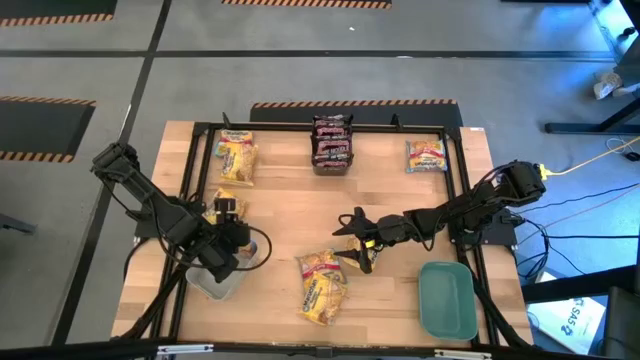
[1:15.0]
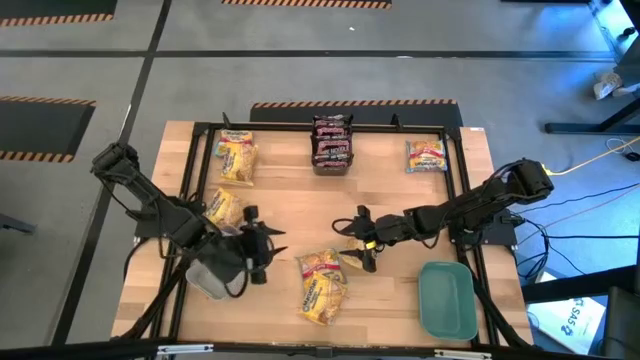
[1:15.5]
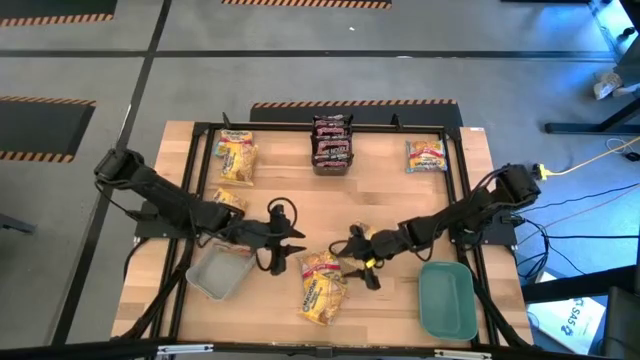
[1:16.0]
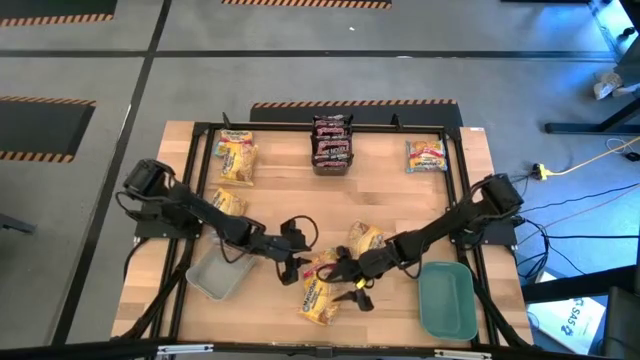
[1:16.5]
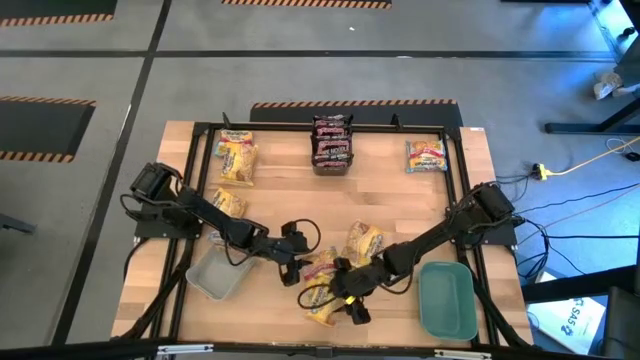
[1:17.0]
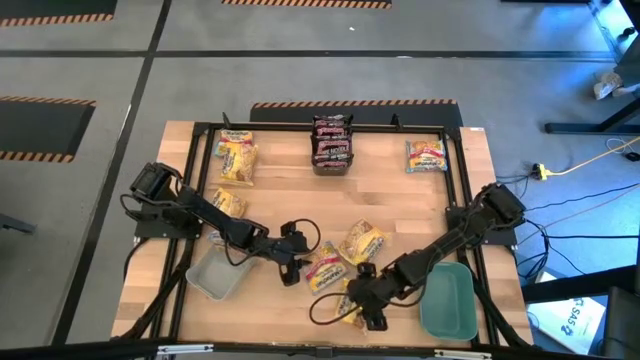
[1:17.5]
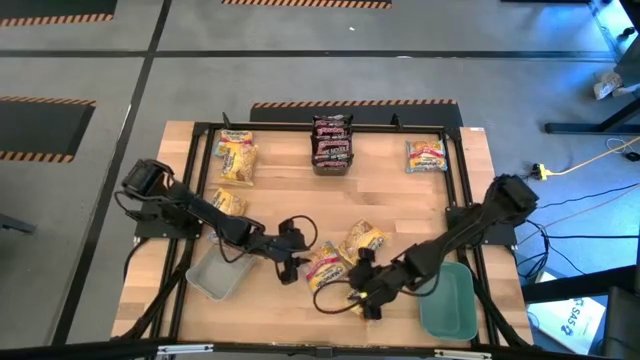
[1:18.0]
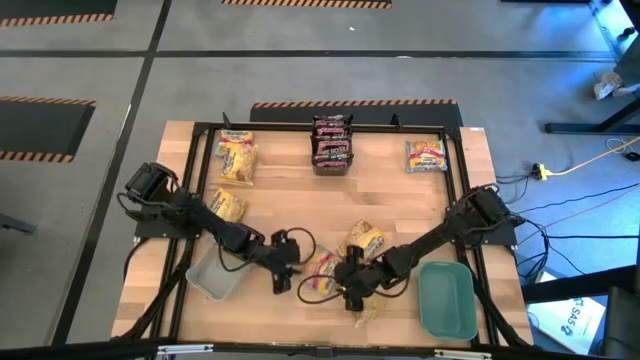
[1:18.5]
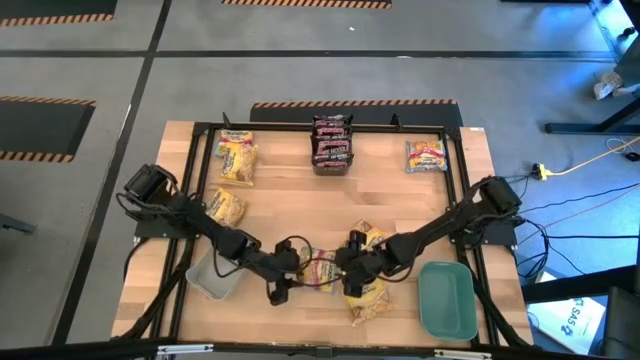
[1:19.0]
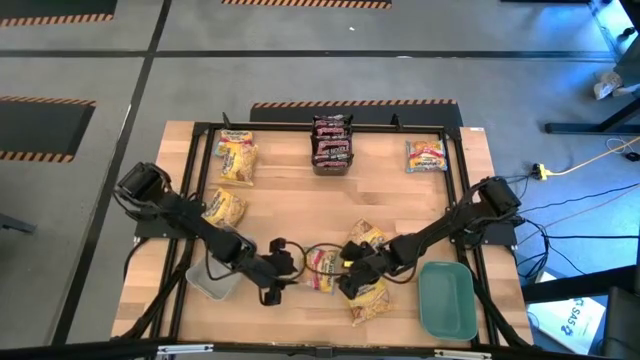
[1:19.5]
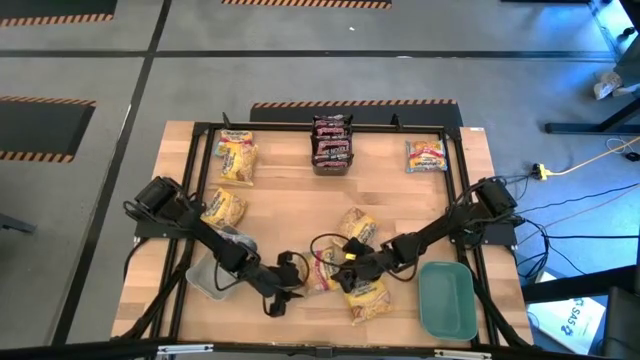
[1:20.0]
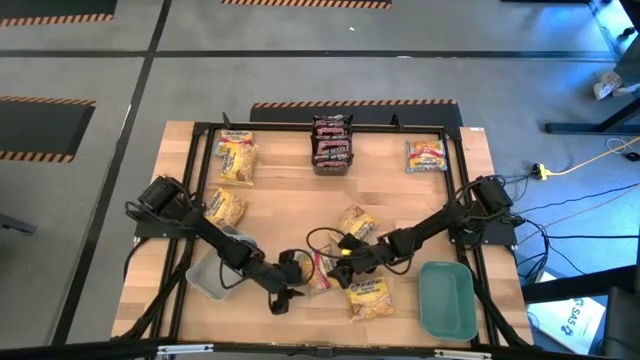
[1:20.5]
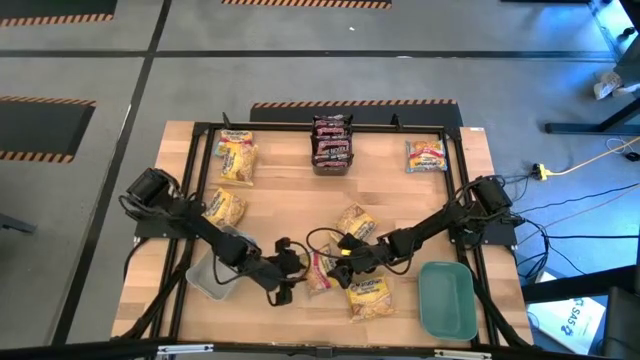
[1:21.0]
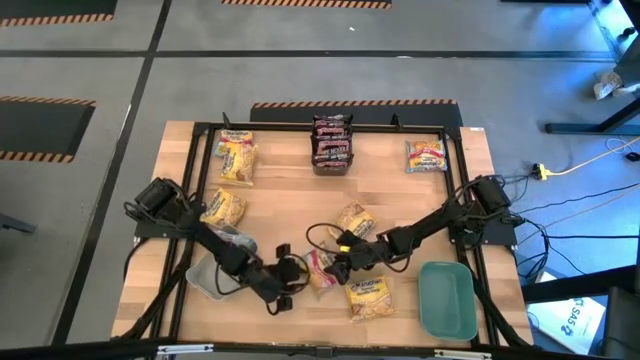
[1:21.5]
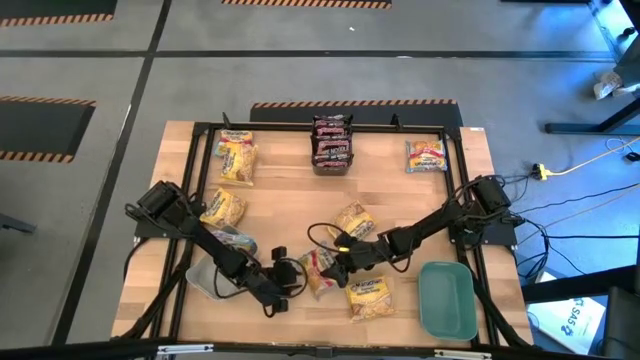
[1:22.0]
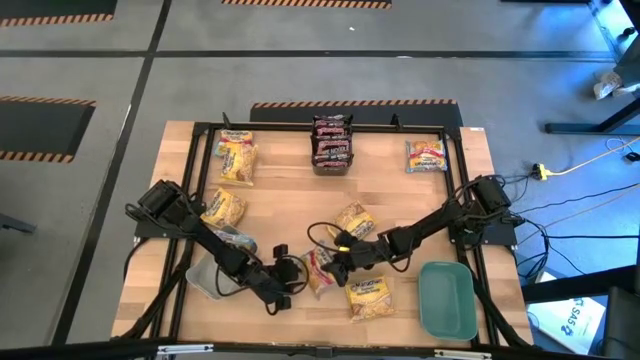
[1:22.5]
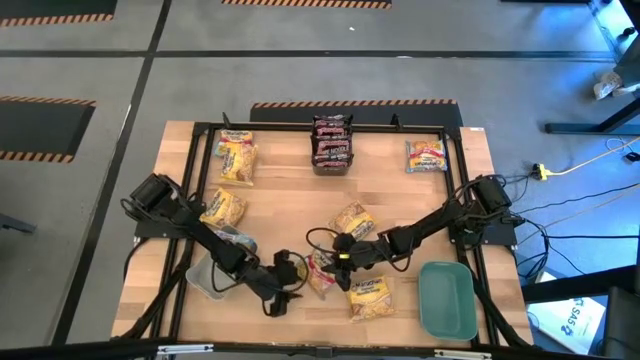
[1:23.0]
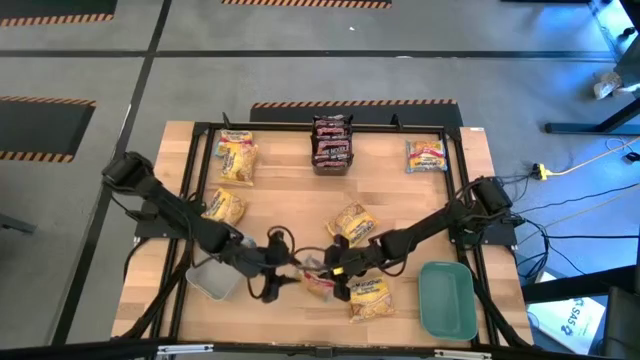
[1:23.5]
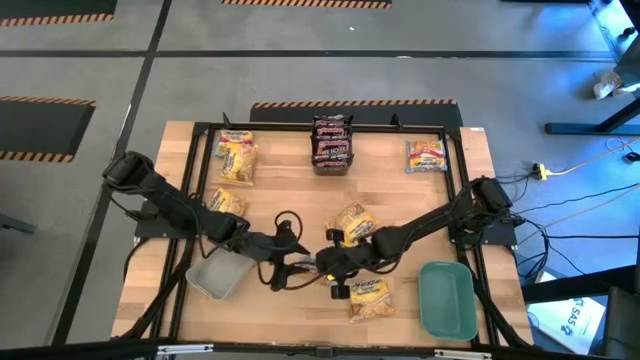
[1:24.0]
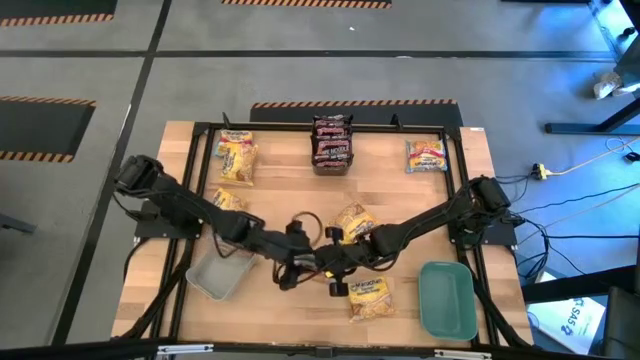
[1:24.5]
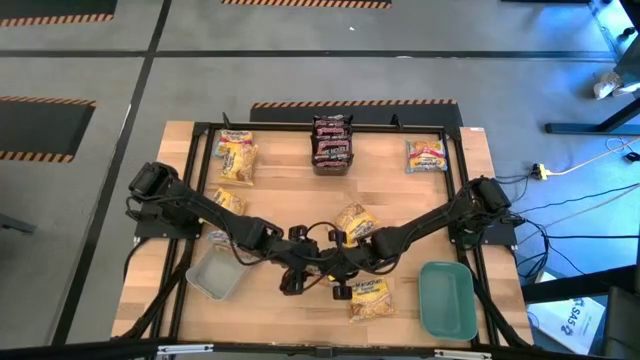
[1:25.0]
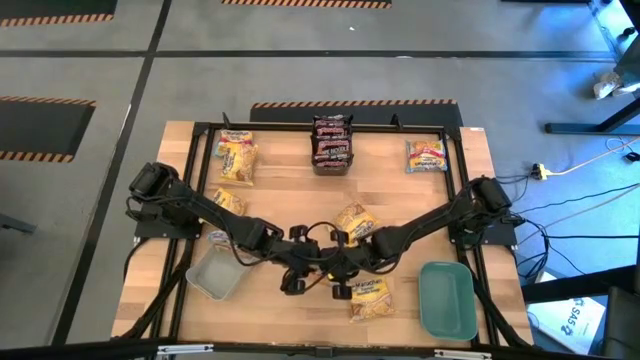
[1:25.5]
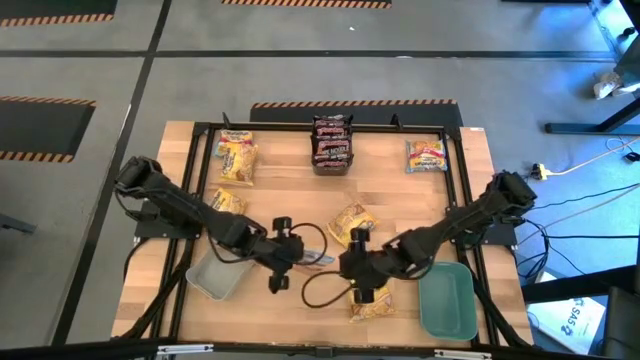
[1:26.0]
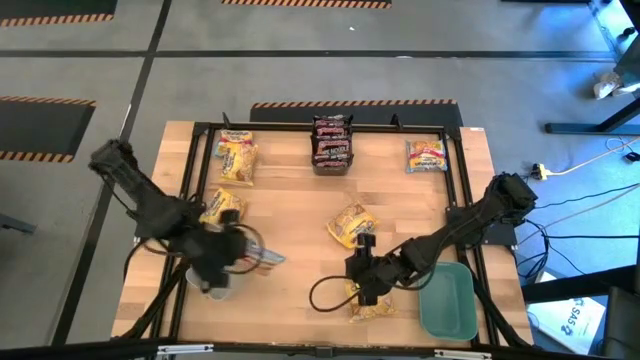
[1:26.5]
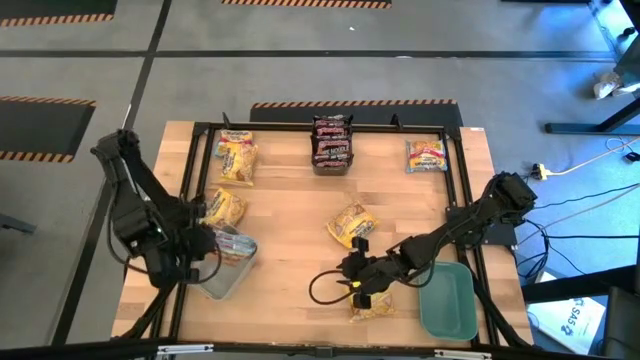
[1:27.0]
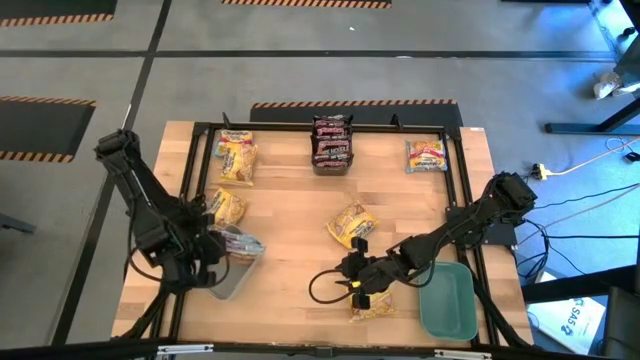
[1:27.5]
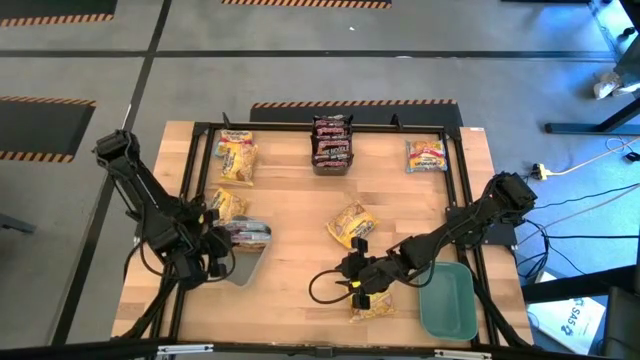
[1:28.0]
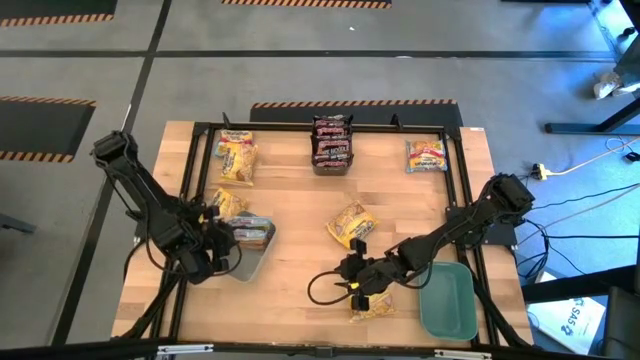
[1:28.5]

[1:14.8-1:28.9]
Task: Sort Maruchan noodles
Put the bottom blue noodle pack into the gray bin

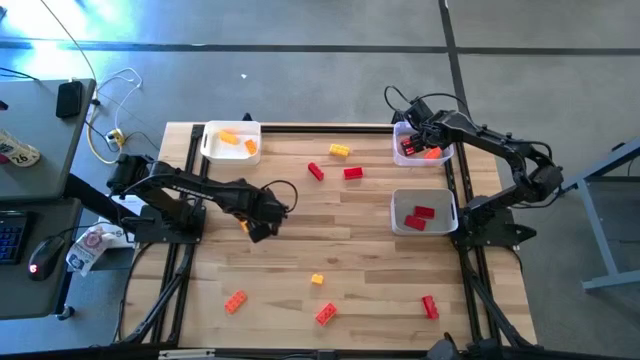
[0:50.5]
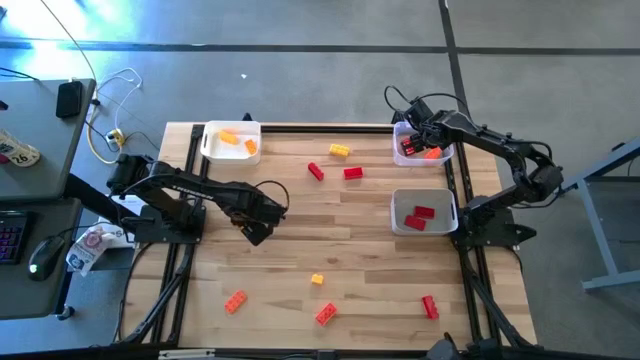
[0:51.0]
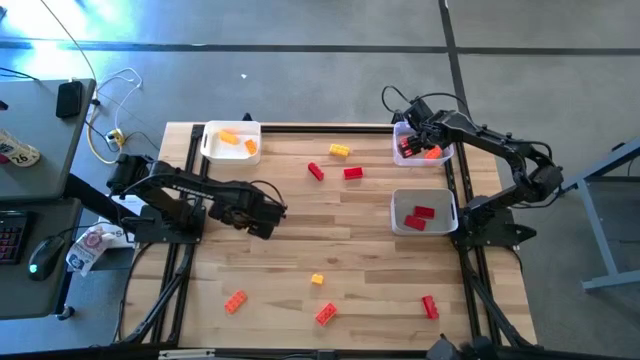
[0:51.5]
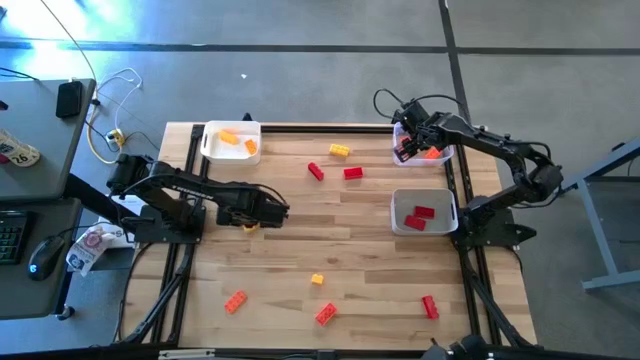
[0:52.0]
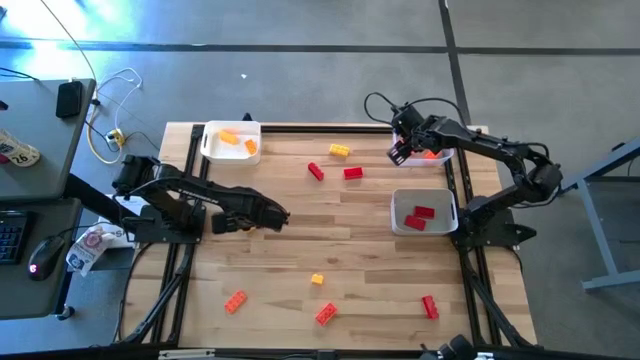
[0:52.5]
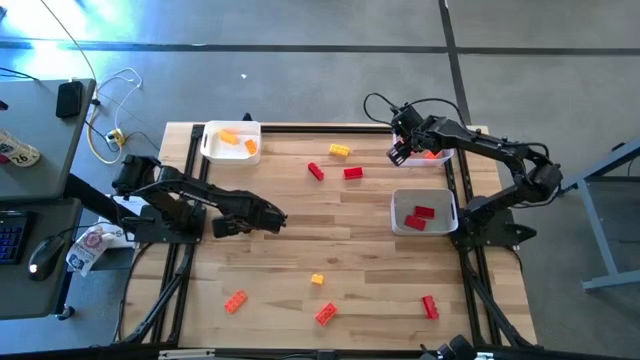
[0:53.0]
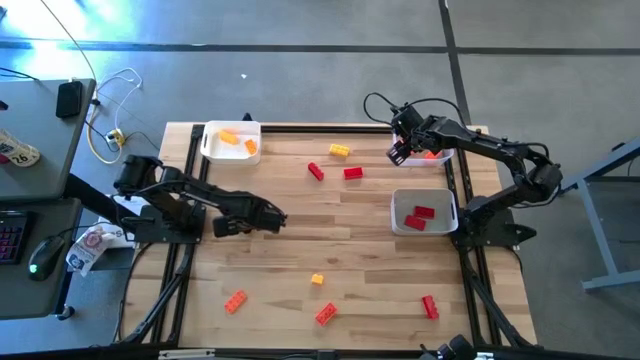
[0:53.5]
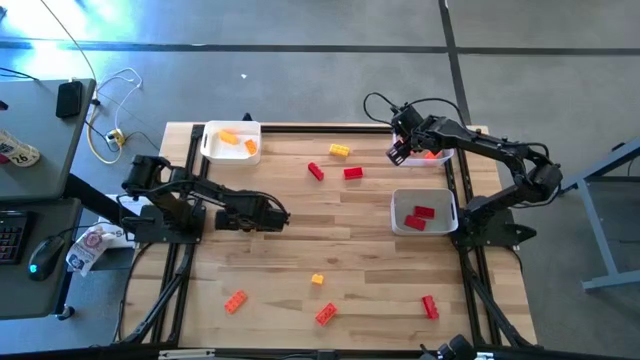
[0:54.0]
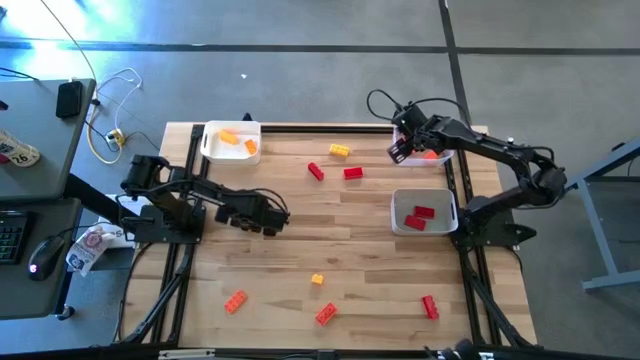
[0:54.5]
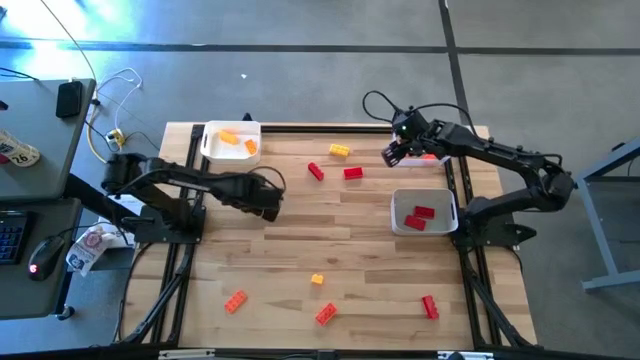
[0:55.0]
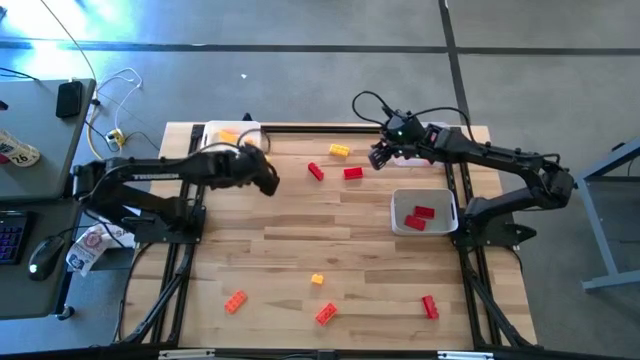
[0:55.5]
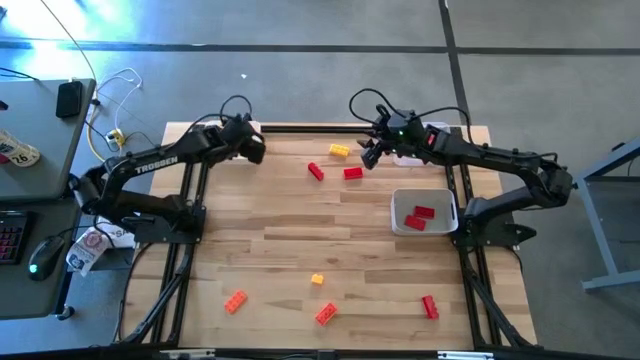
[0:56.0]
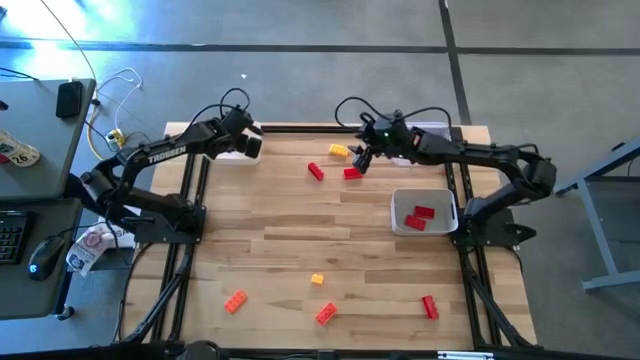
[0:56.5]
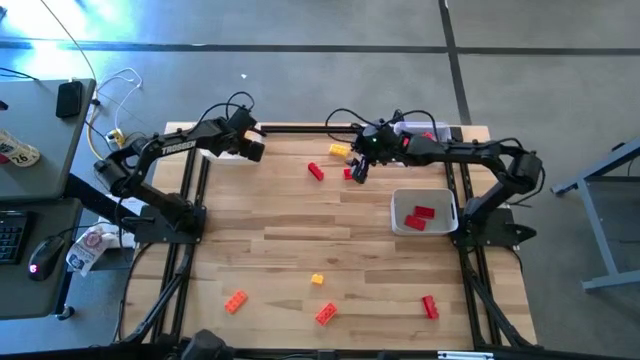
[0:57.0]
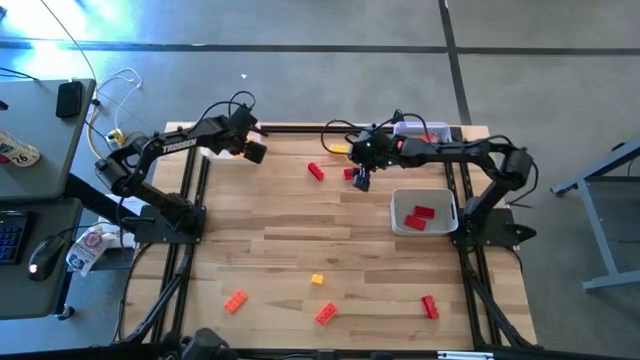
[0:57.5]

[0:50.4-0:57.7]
Task: Sort & place blocks by color
Put the yellow game piece into the white bin
